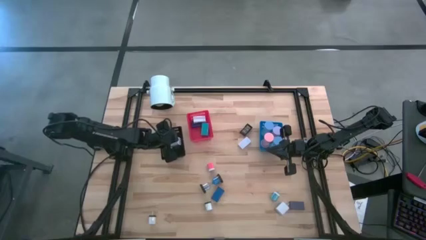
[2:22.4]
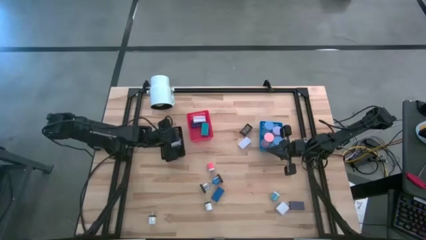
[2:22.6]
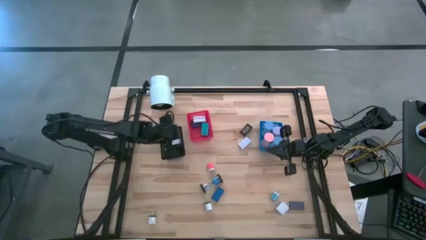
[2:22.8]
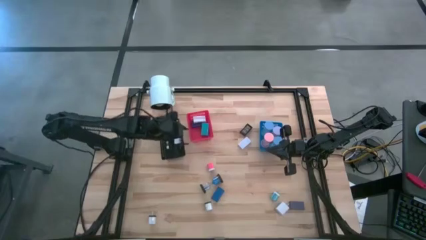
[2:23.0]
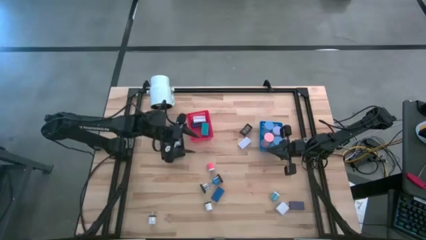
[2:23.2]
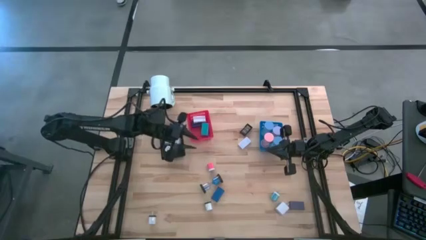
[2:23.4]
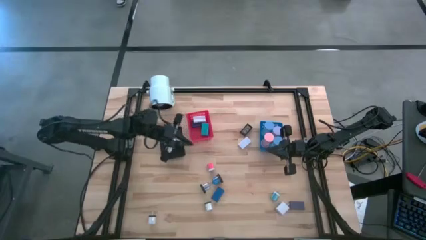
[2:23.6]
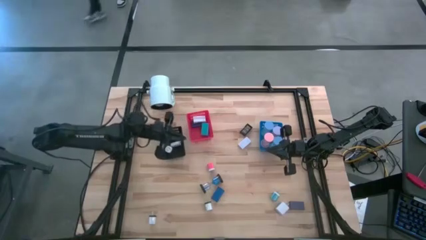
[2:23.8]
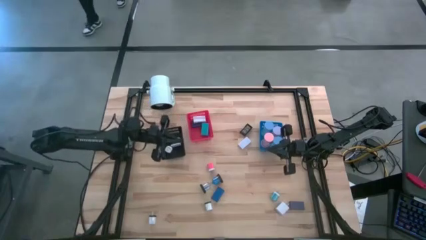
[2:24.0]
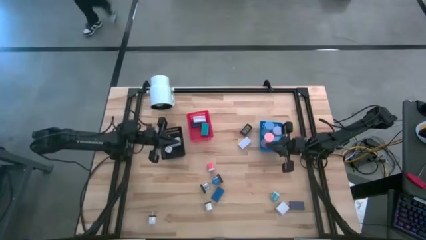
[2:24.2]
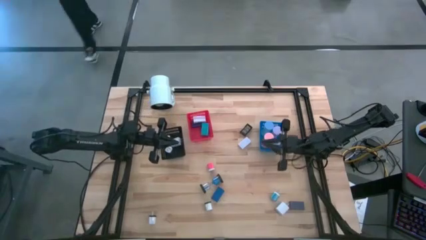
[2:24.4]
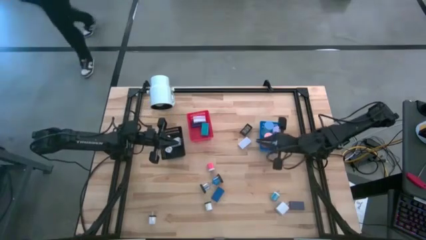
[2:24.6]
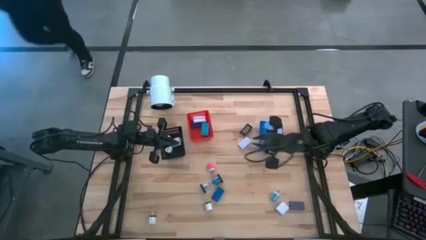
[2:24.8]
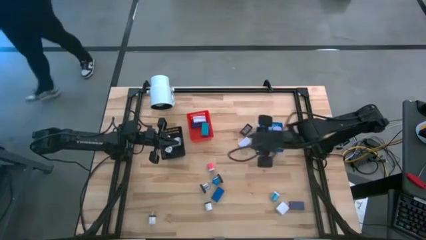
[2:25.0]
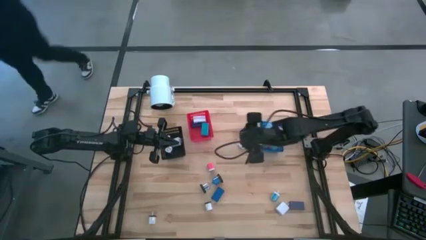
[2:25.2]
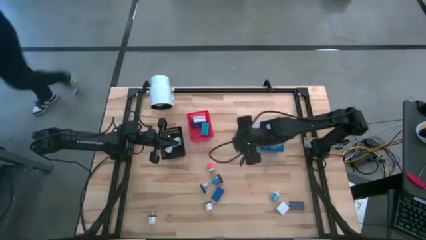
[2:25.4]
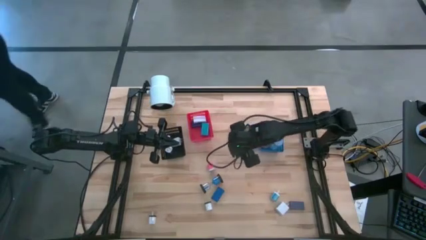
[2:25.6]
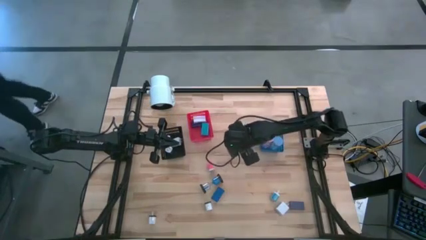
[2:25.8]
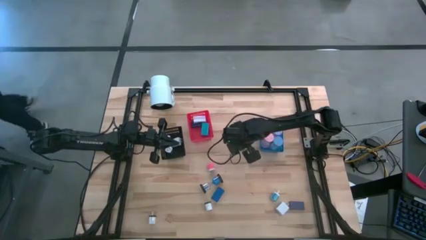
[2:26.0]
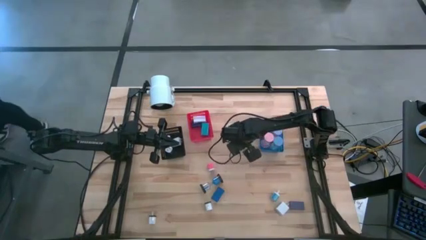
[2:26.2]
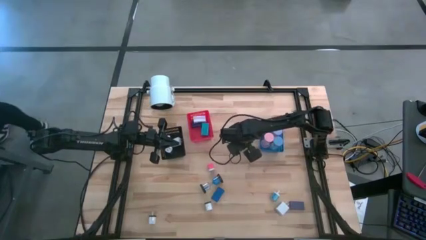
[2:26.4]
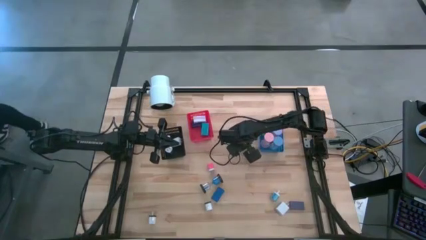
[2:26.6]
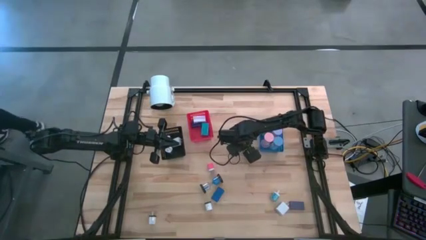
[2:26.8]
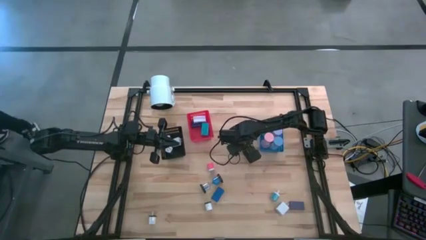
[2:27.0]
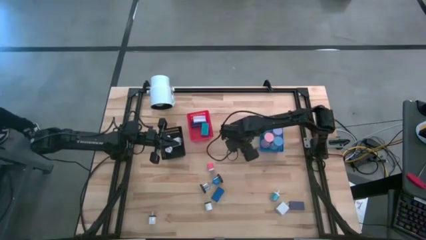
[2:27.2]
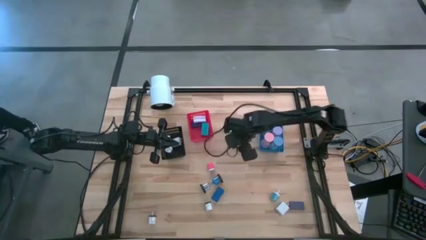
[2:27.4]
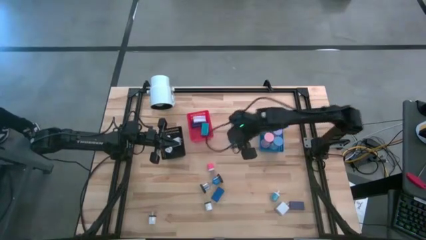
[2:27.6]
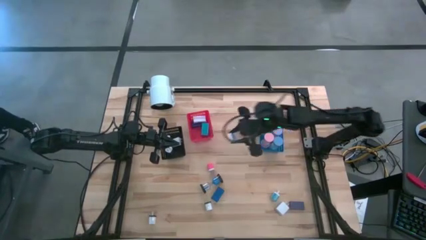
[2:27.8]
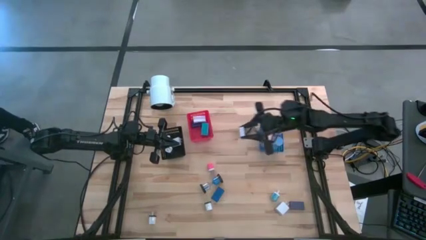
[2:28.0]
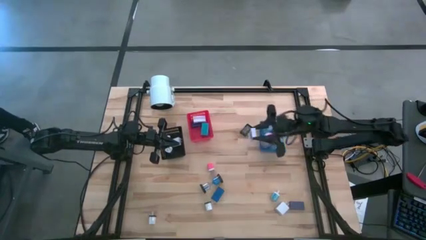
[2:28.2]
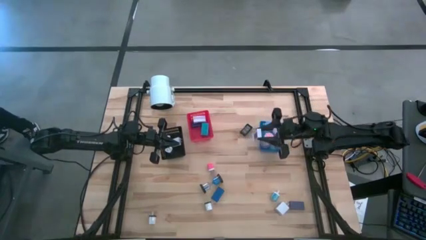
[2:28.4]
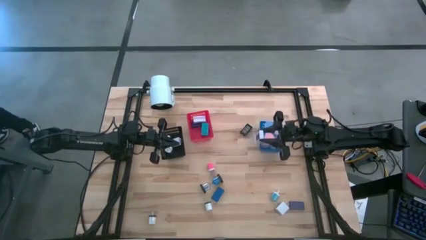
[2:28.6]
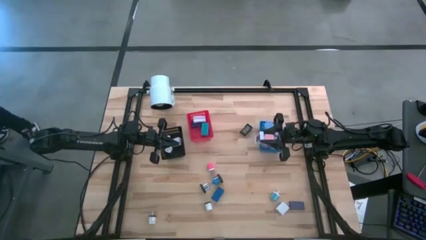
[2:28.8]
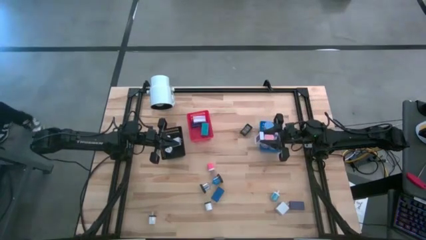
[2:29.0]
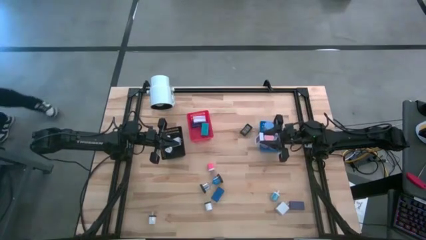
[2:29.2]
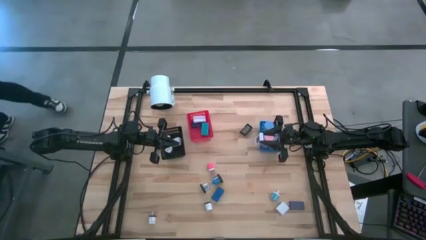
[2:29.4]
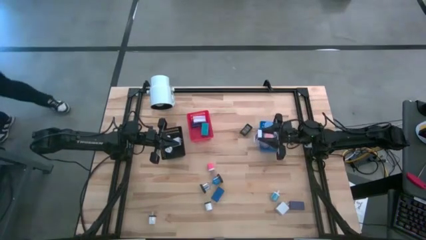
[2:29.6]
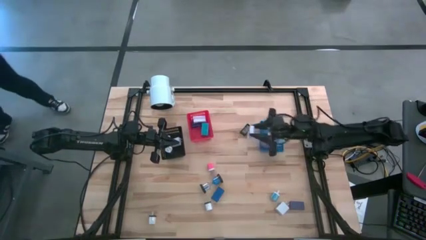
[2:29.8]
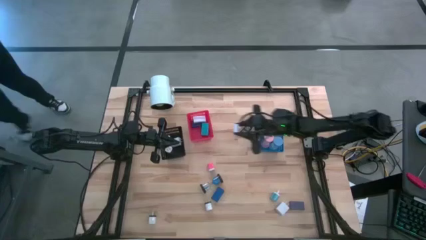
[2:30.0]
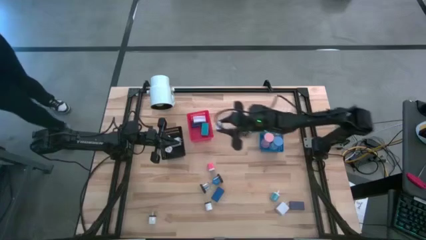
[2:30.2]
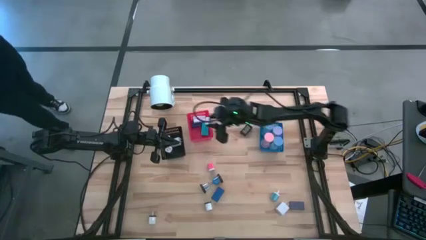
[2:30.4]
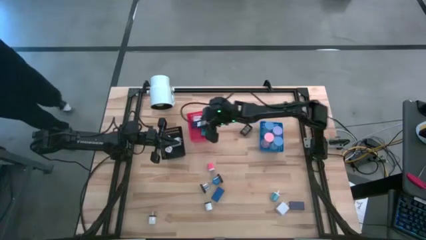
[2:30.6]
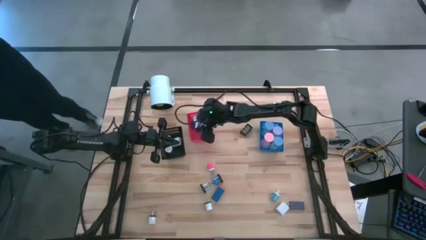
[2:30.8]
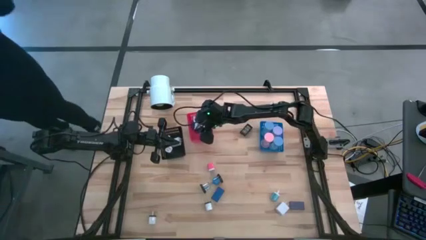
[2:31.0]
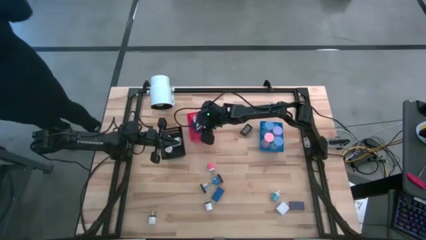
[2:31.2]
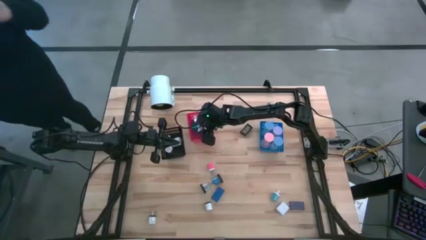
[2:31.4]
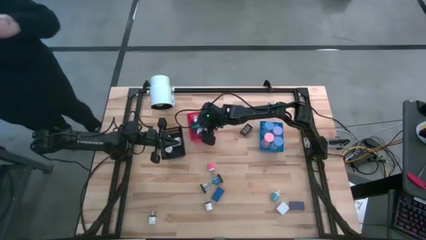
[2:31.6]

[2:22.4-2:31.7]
Task: Pick & Place Office items
Put the white digital clock into the red bin

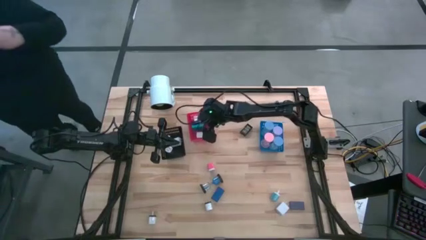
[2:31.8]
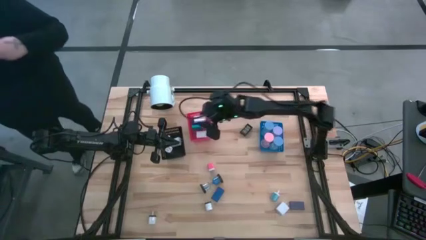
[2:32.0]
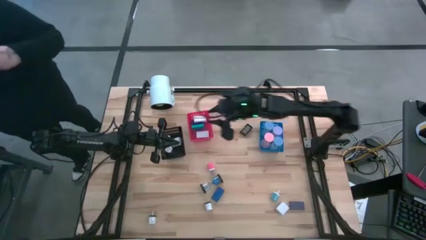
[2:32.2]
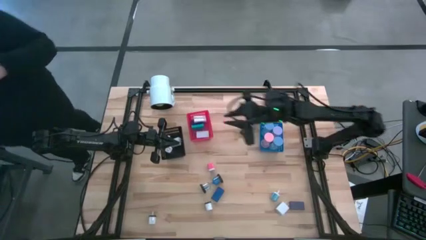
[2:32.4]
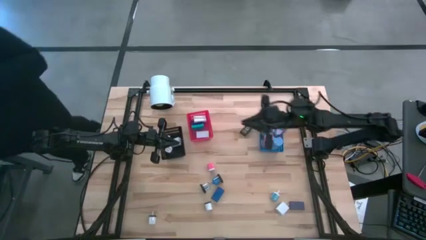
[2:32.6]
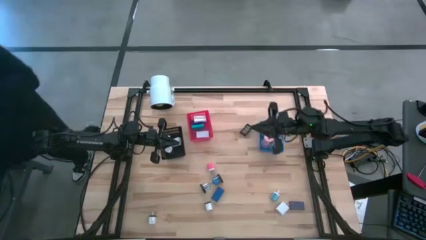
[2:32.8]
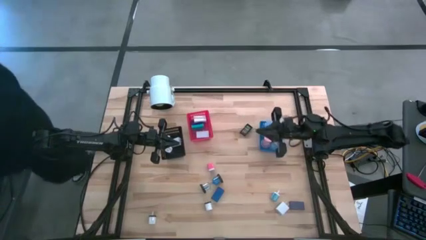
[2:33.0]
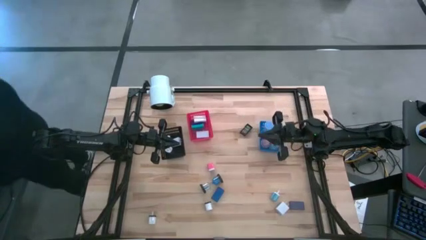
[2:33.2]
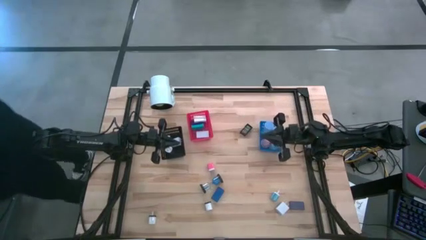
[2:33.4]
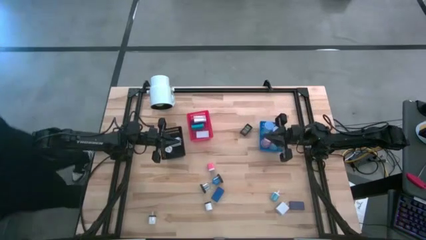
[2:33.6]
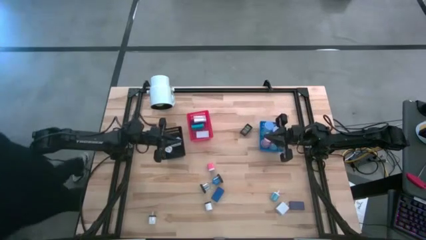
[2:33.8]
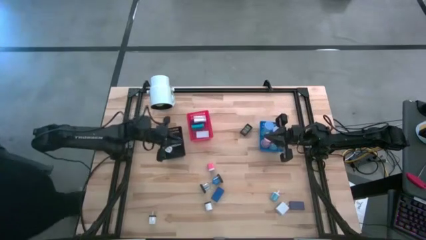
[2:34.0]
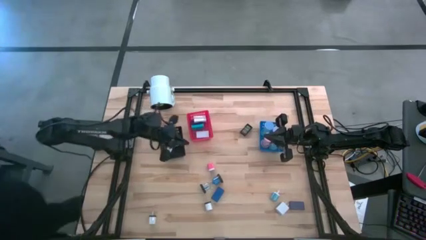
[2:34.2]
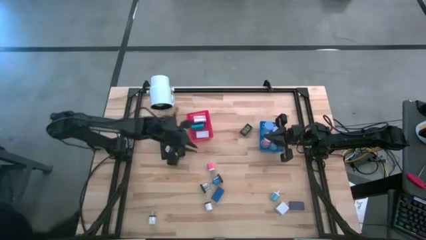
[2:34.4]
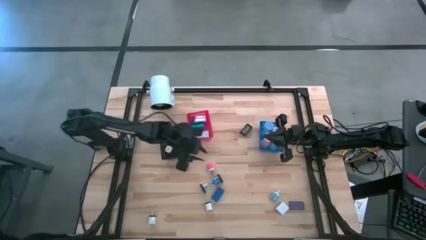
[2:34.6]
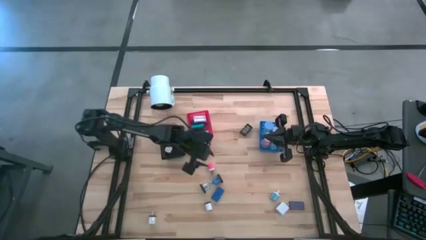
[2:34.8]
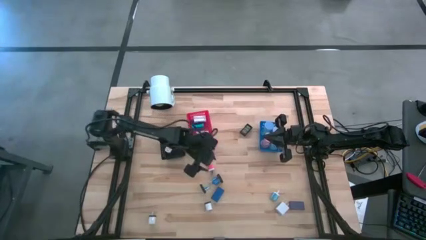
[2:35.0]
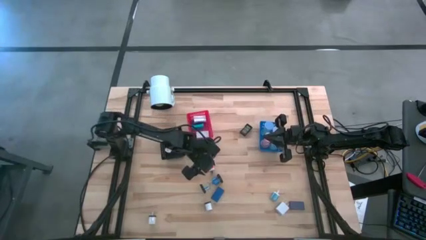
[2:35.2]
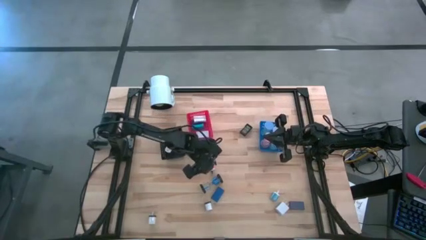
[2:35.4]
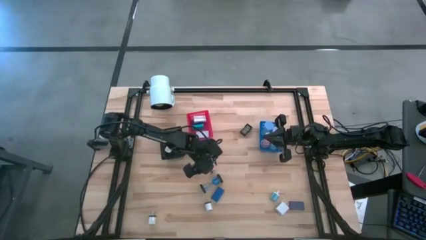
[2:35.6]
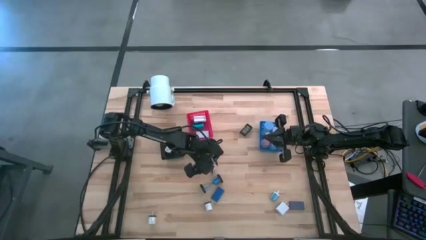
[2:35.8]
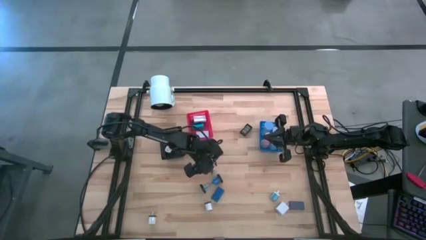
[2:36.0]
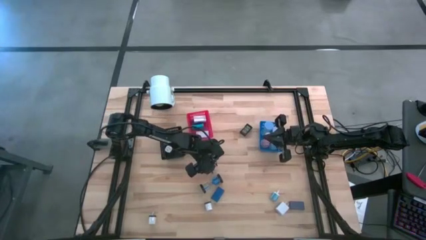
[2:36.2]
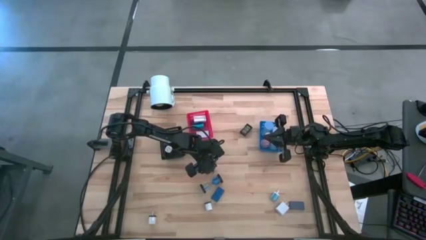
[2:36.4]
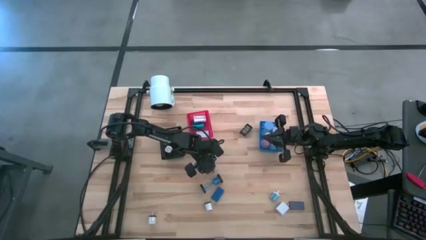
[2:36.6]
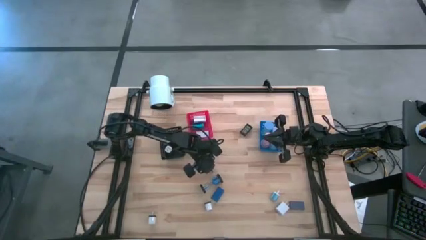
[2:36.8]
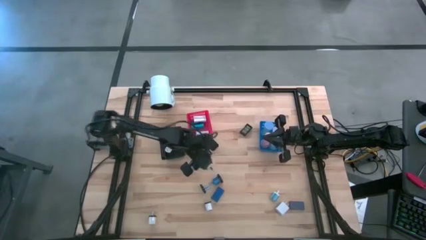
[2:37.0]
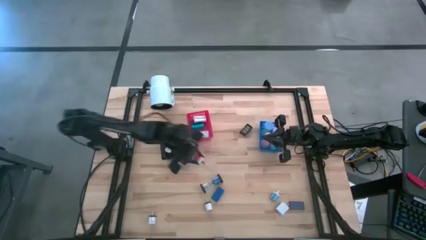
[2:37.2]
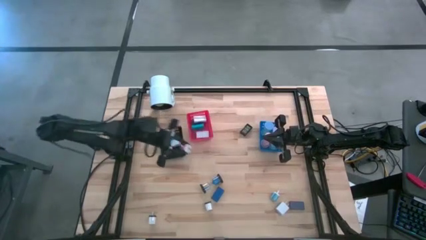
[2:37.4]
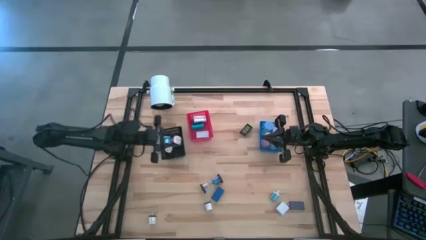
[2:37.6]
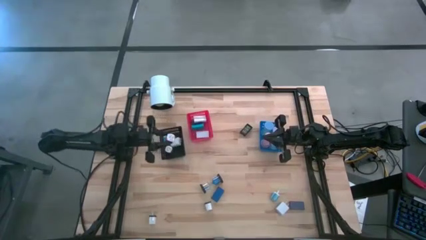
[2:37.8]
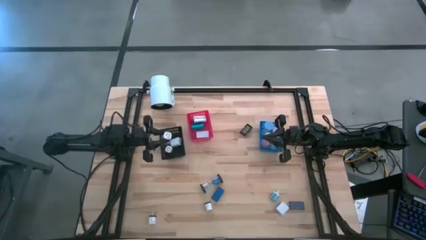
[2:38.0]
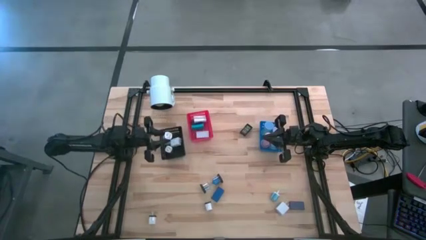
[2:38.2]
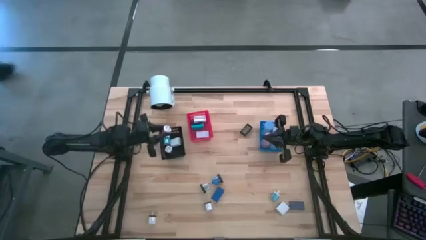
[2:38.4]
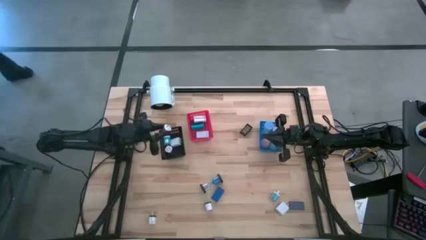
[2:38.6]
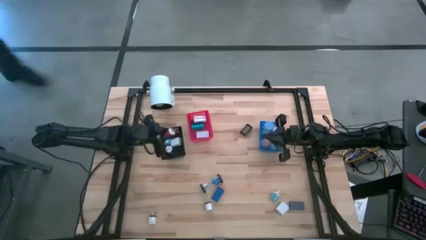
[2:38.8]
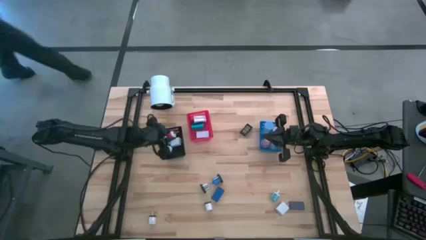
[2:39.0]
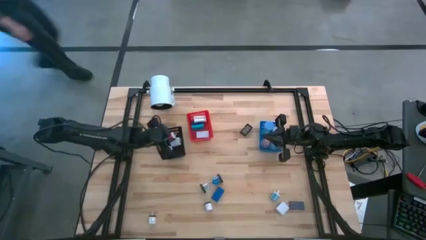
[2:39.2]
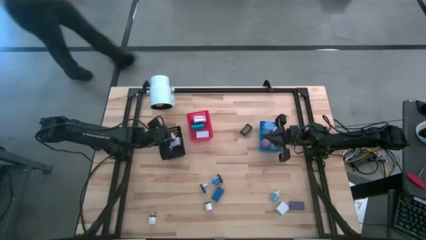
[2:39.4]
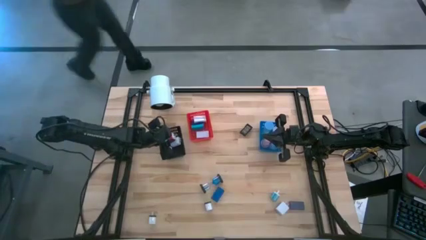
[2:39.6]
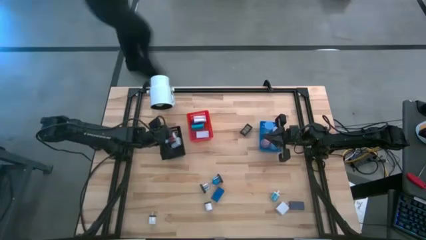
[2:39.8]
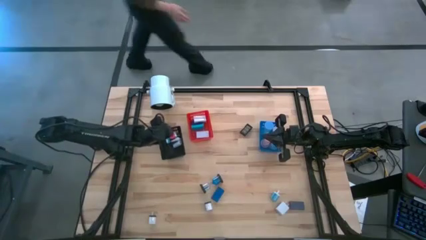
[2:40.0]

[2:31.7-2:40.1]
Put the pink charger adapter into the black bin
